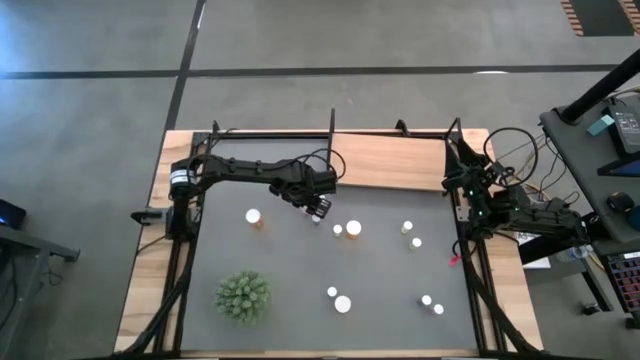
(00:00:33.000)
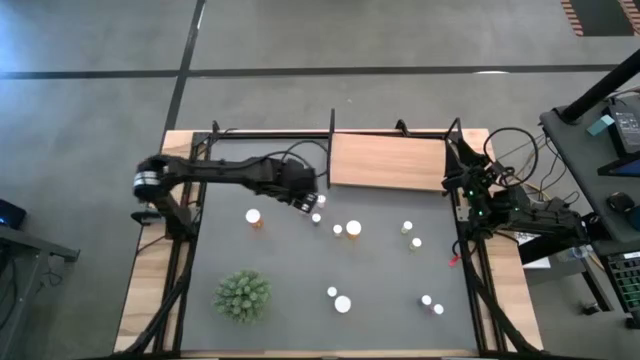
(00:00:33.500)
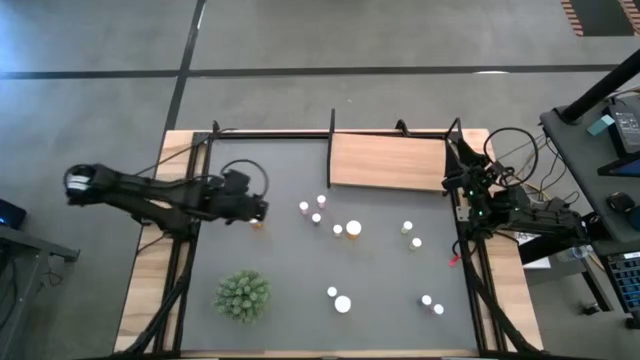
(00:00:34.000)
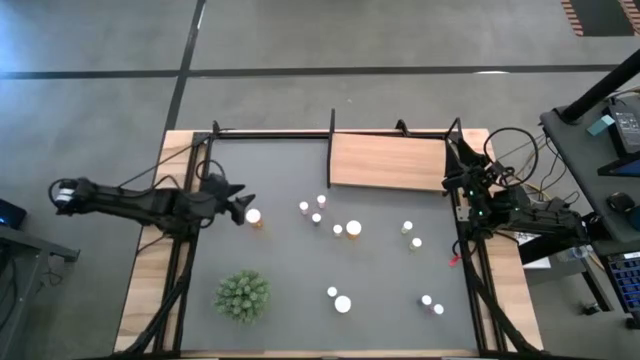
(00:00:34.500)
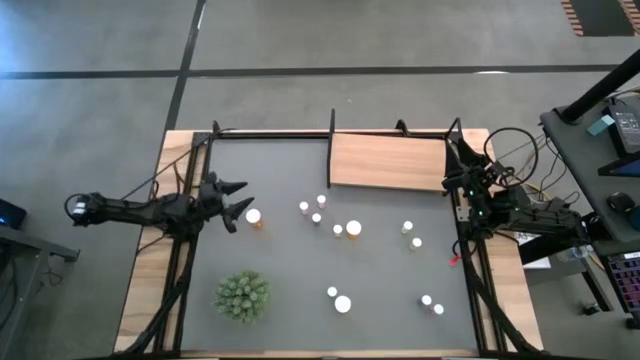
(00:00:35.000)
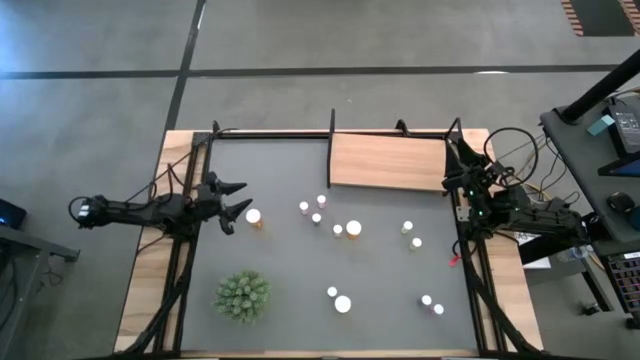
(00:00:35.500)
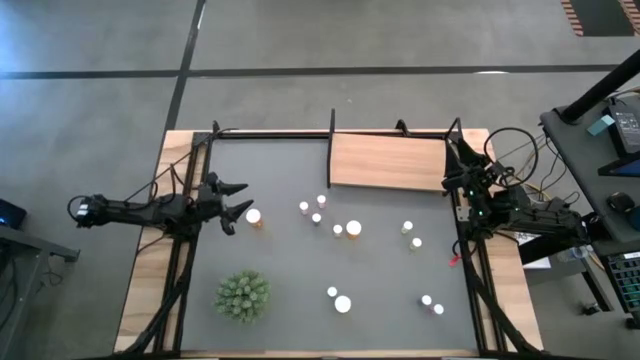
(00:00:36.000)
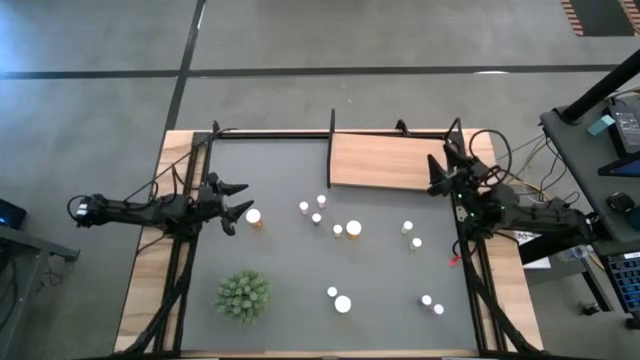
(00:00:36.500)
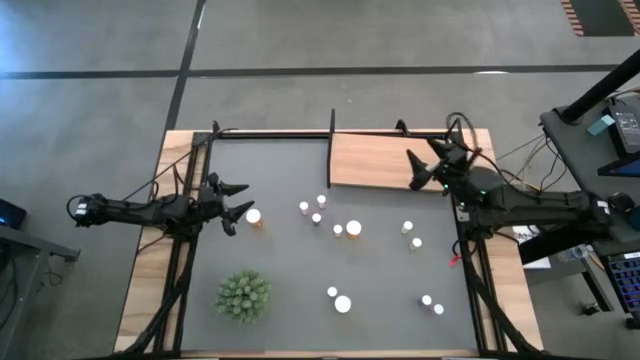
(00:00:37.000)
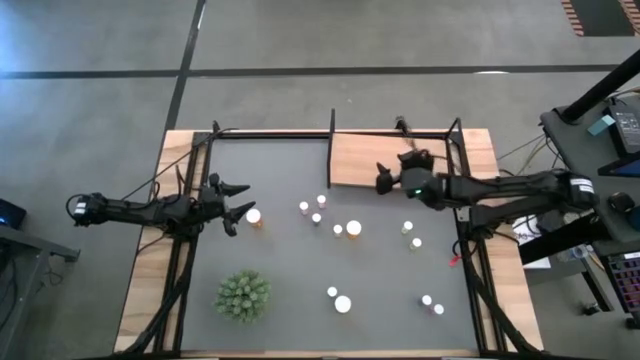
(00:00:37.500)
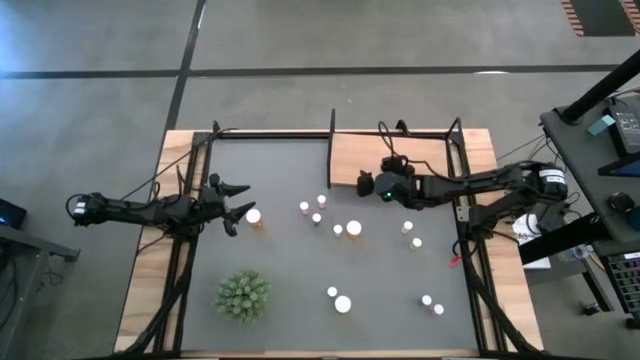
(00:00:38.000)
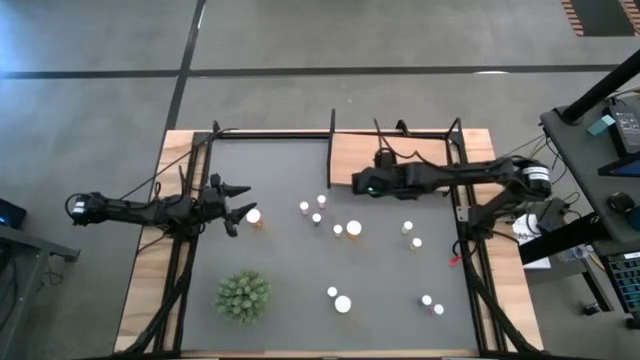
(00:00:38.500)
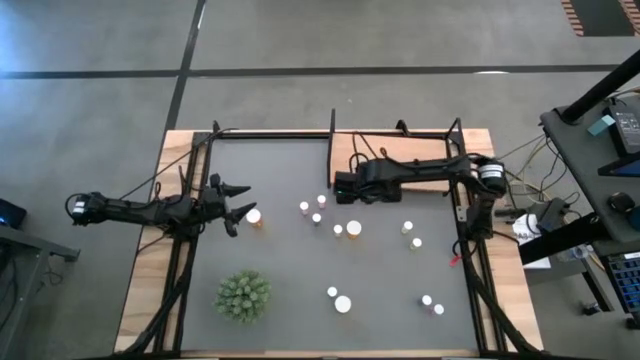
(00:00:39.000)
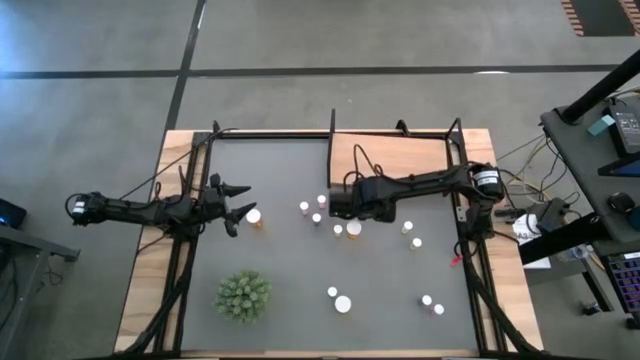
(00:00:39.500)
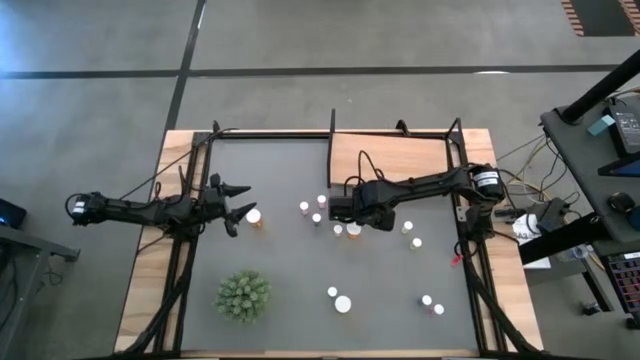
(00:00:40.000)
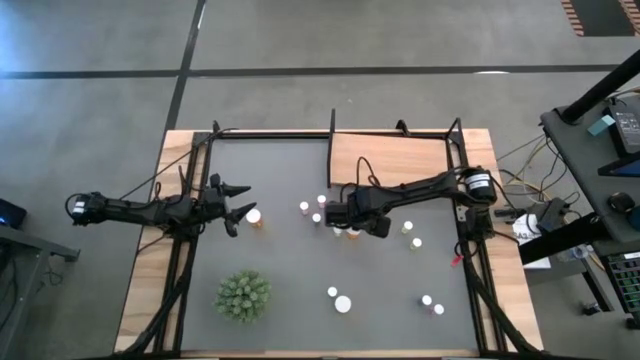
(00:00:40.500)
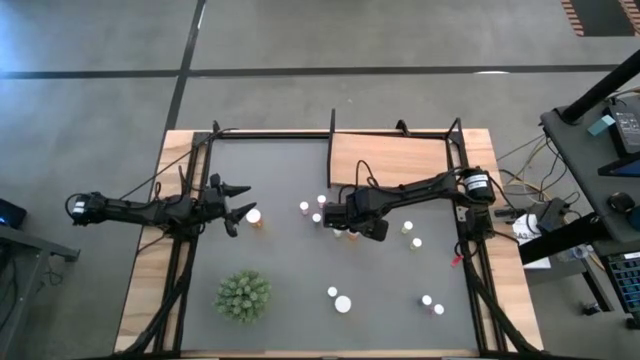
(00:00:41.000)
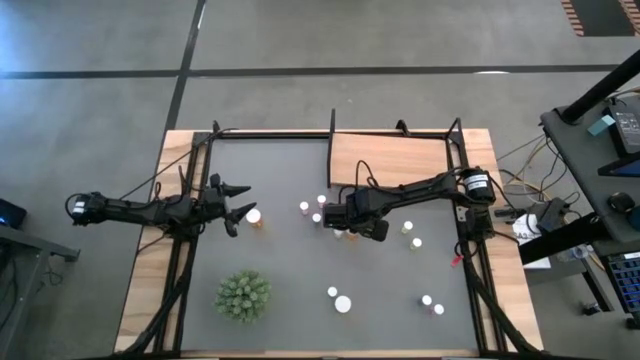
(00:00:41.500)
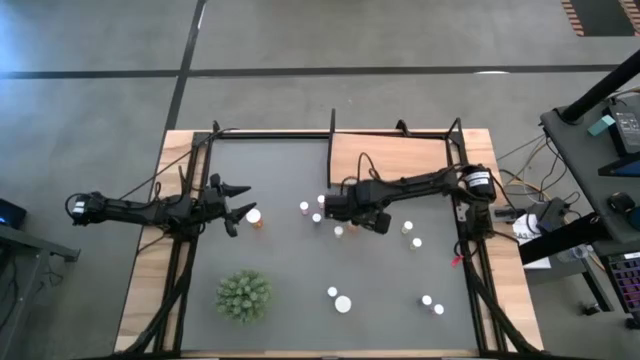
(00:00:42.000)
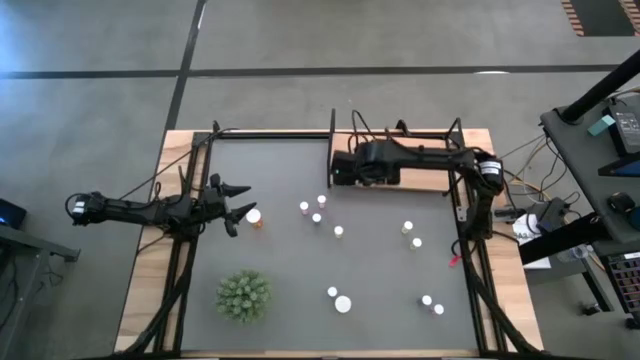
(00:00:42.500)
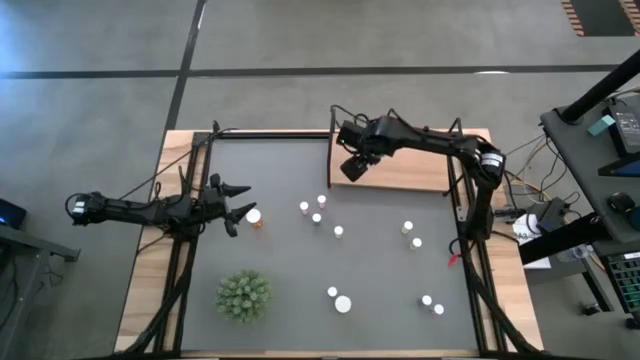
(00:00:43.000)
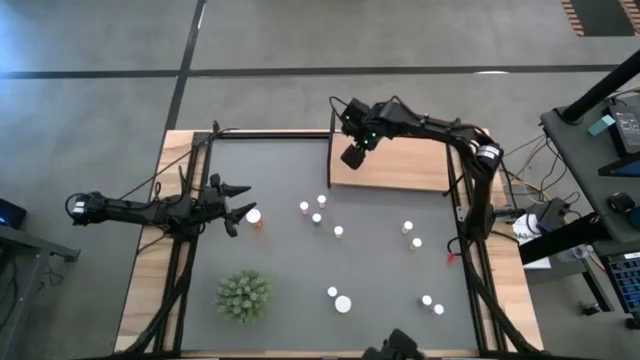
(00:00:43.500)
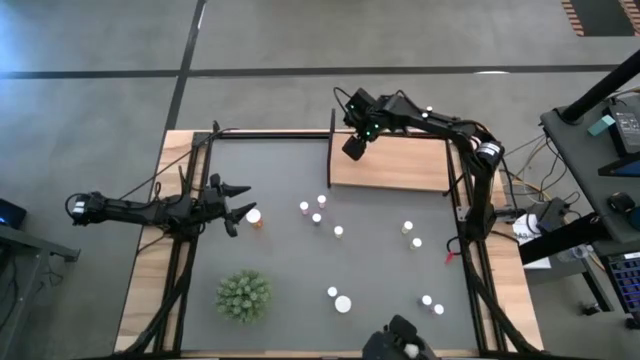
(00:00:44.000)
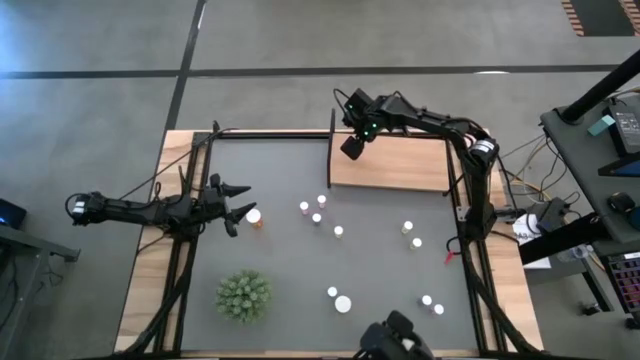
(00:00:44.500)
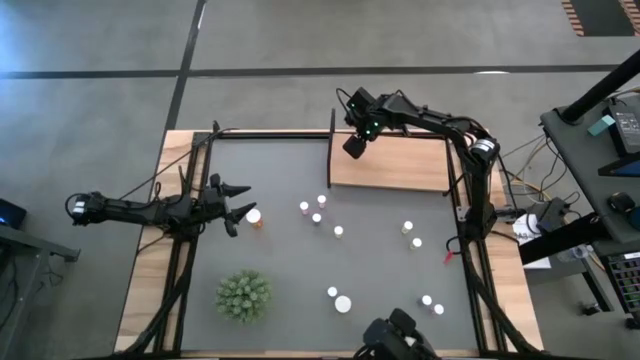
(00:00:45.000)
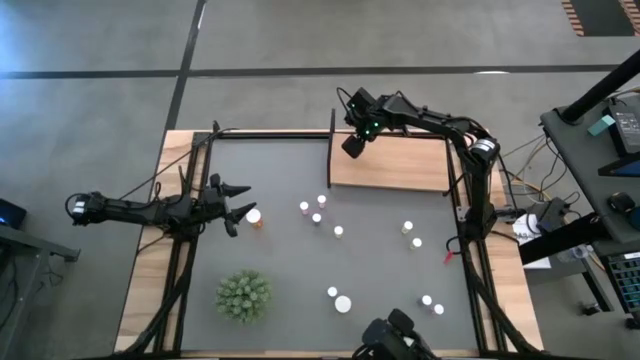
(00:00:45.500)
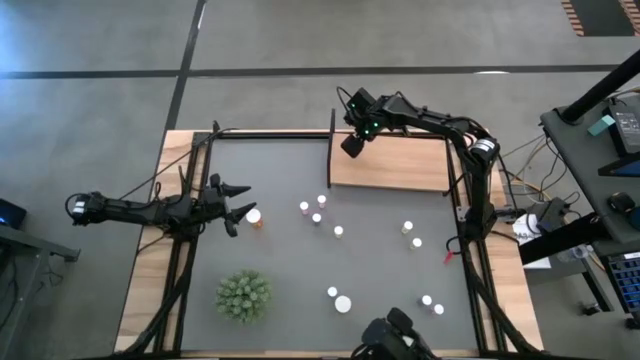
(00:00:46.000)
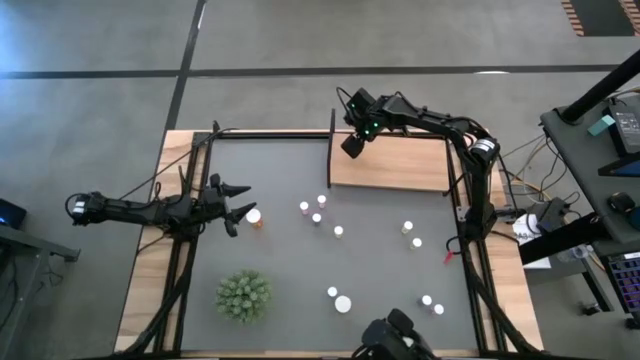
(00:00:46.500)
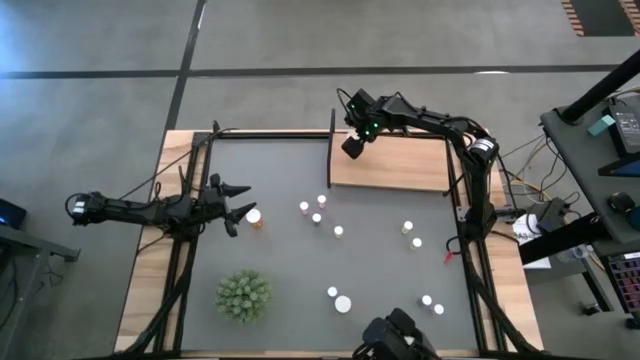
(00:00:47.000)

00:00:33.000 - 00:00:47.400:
Task: Pick and place medicine bottles onto shelf by color
Put the top right orange pill bottle on the shelf

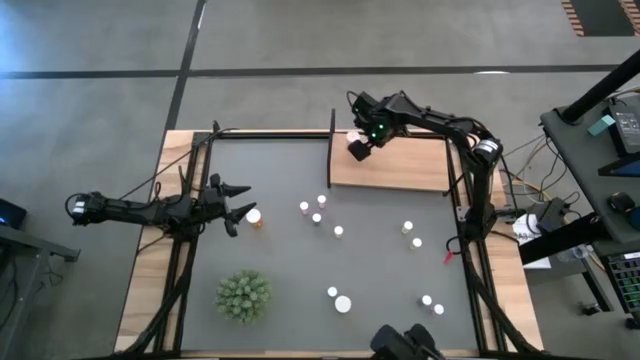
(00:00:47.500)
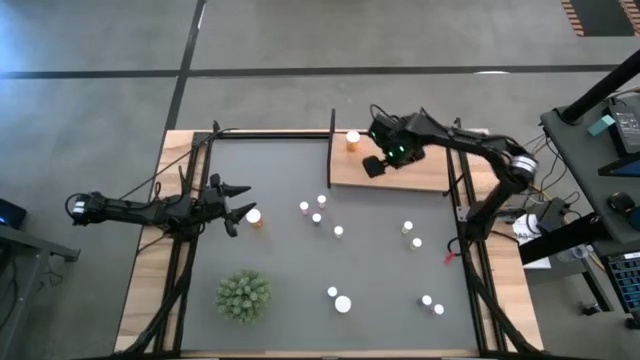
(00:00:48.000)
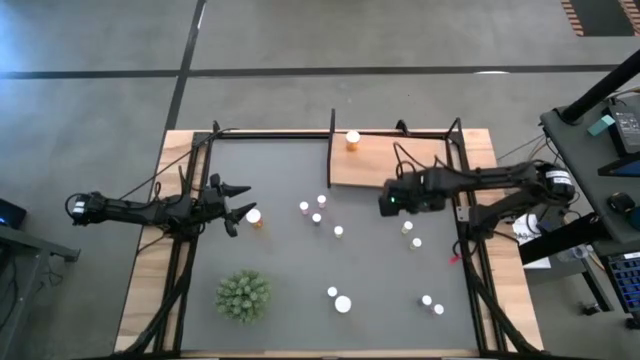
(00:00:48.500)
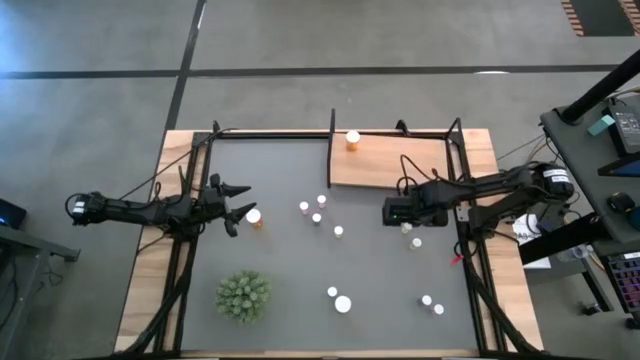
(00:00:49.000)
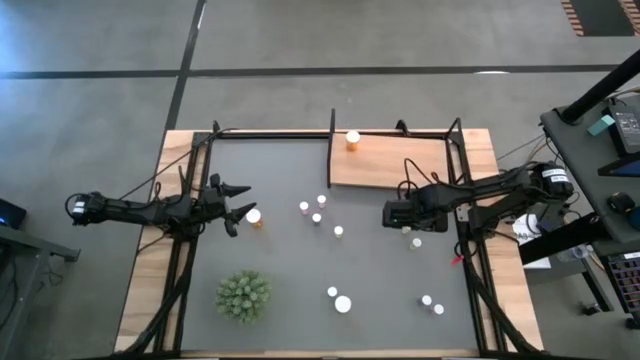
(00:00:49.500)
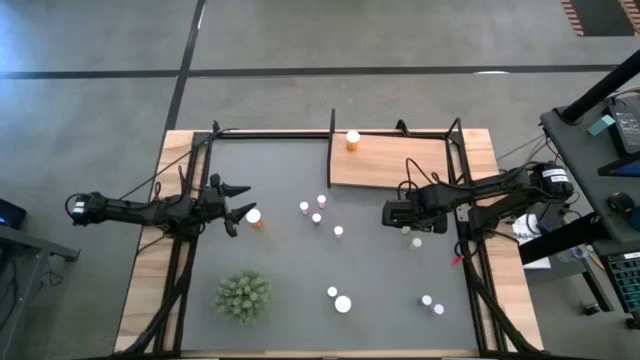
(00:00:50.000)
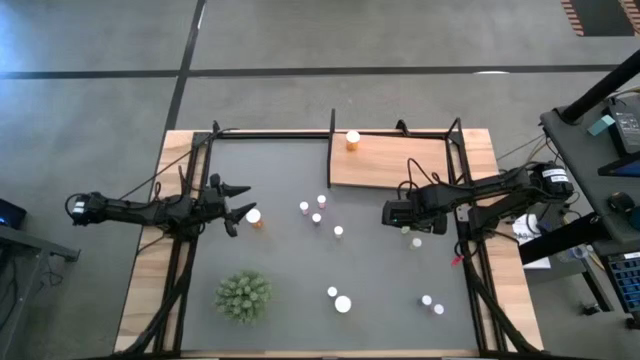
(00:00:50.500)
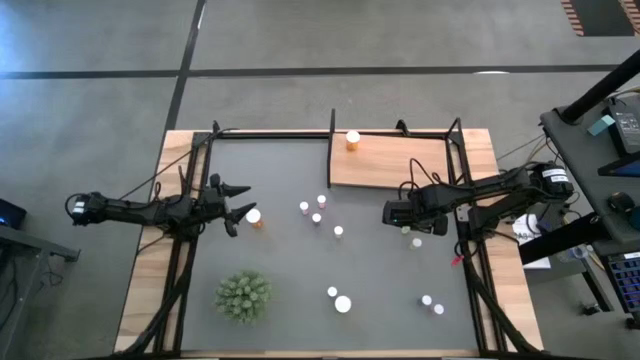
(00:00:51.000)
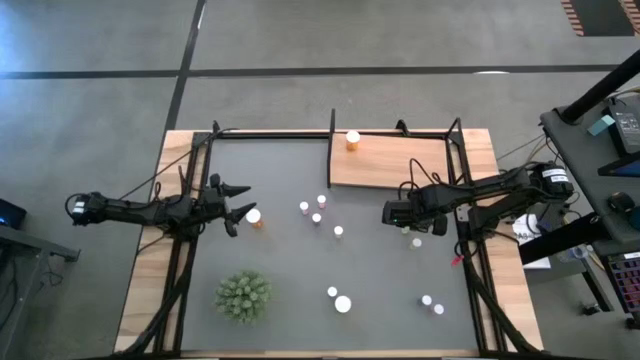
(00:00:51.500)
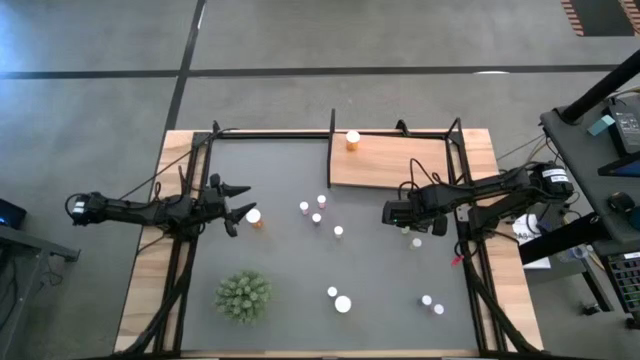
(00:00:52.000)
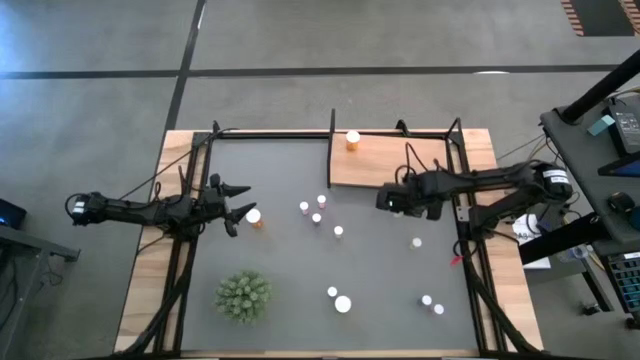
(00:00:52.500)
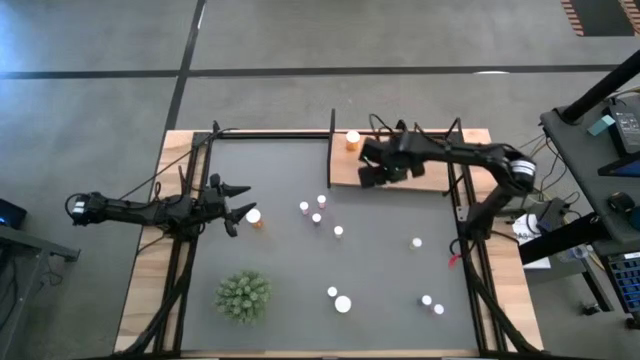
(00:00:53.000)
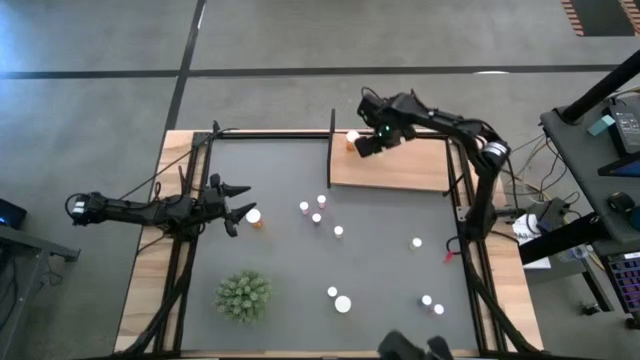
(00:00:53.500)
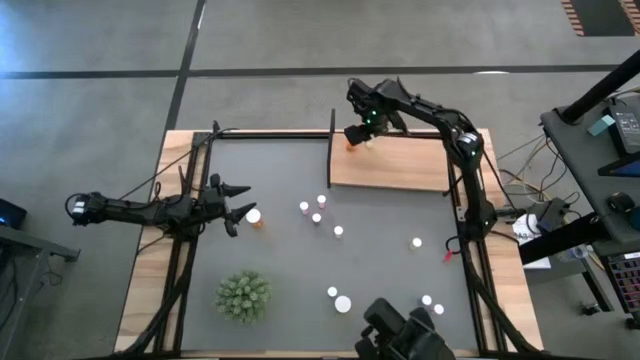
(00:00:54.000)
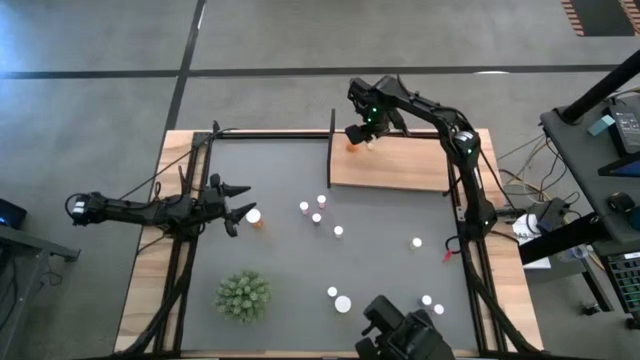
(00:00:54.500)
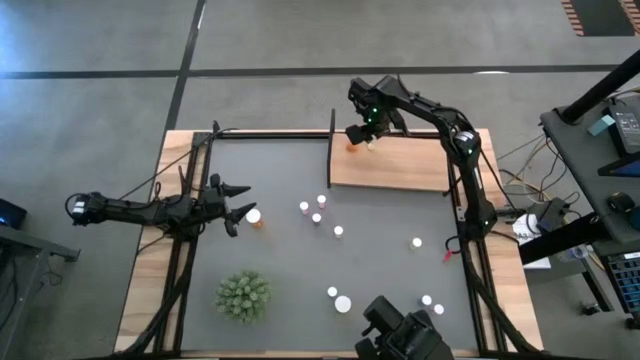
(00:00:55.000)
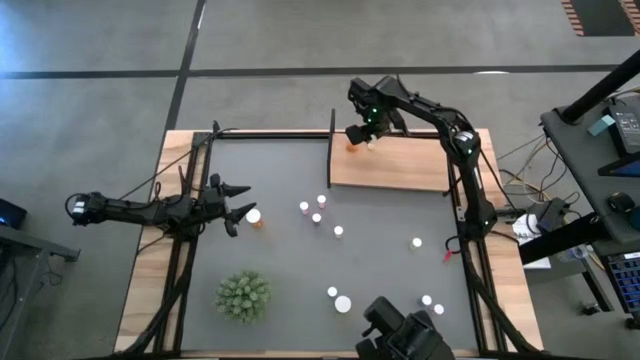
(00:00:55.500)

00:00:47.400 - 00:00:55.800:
Put the top right yellow pill bottle on the shelf
